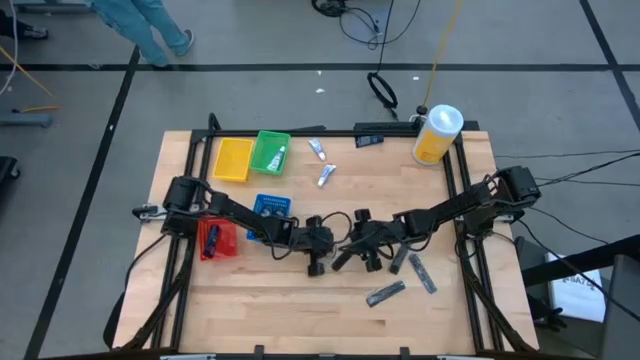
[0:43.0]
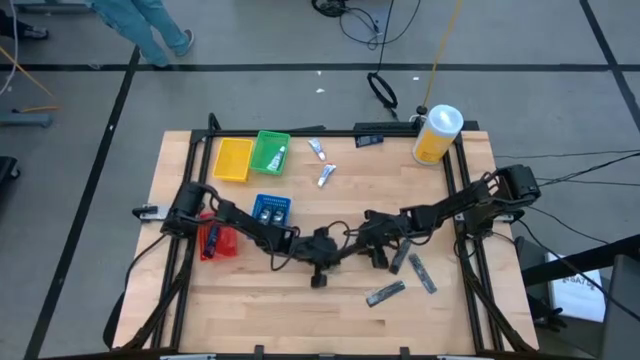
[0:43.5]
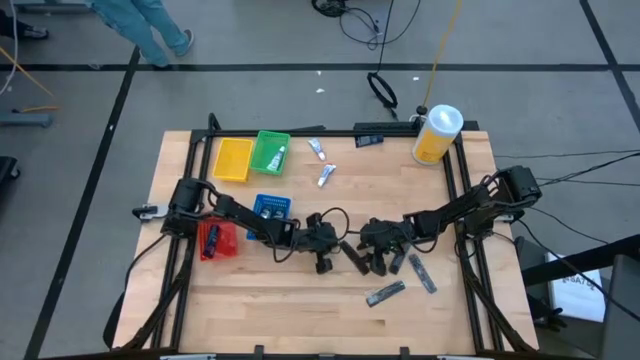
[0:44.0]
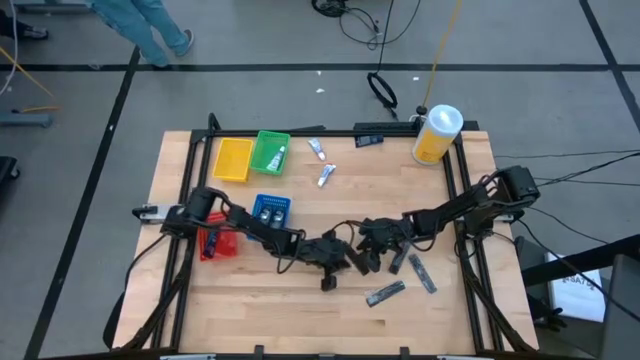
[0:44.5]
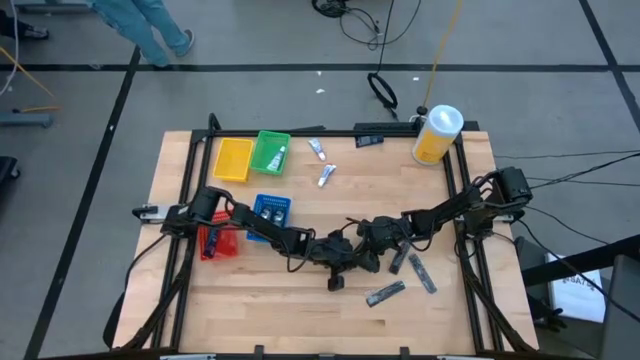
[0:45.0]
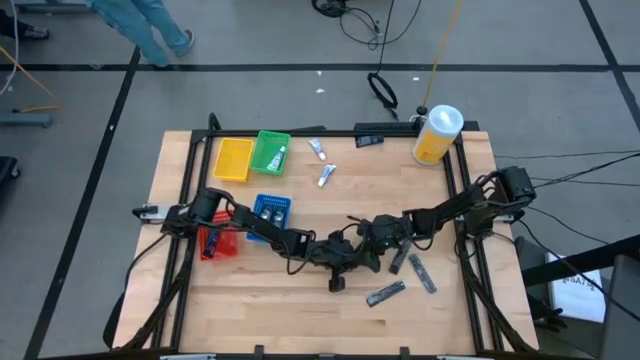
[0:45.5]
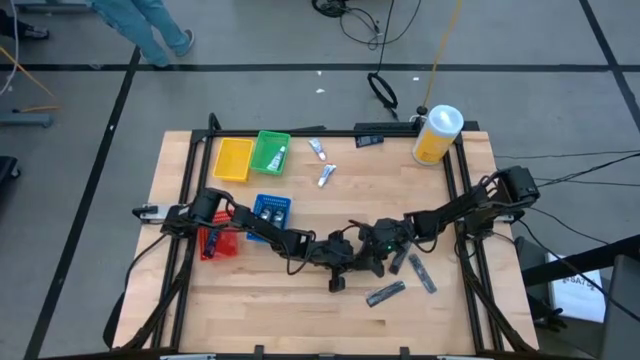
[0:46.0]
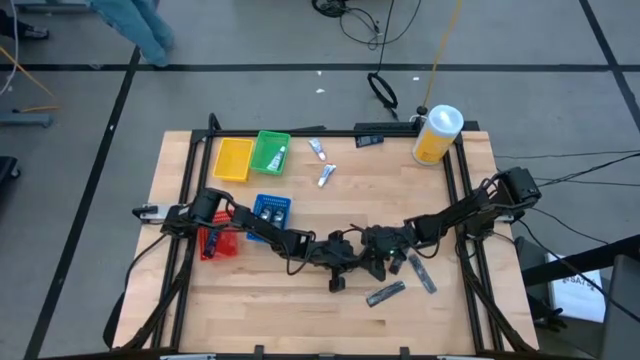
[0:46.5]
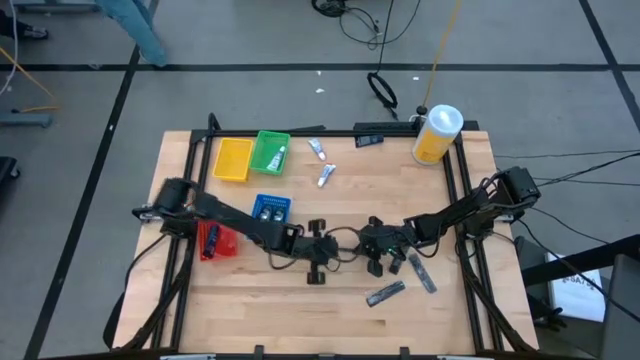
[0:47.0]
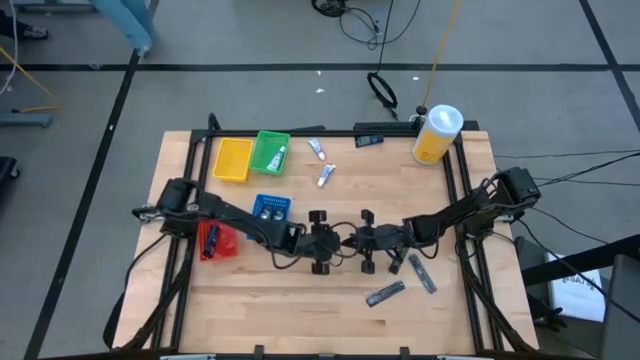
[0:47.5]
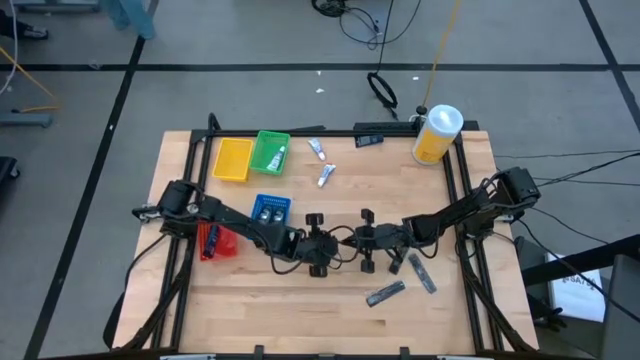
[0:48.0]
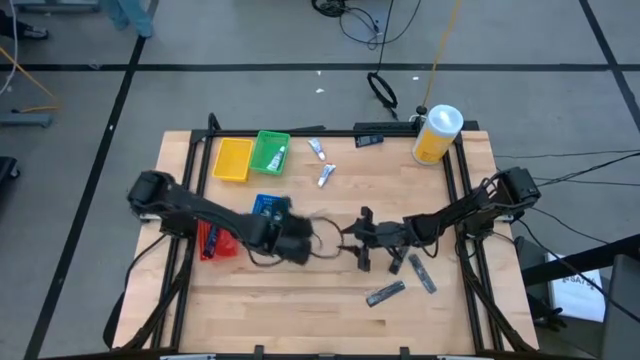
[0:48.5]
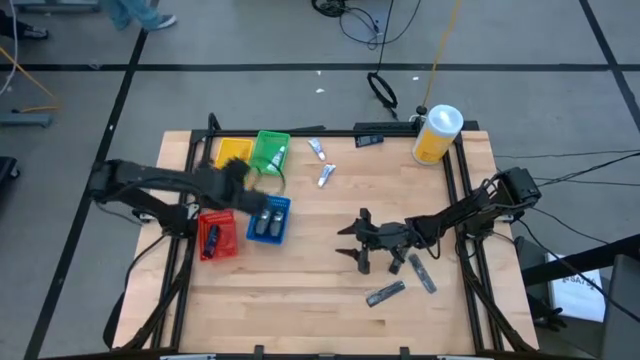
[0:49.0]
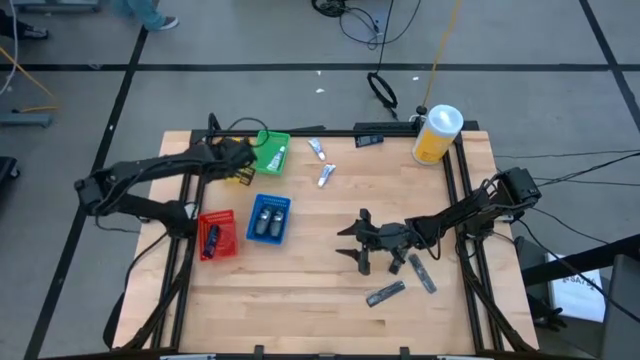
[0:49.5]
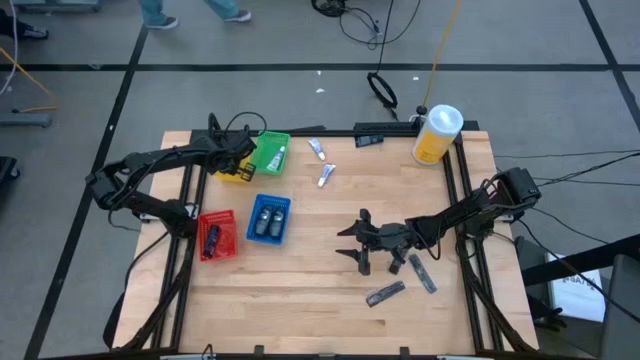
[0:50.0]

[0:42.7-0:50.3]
Task: Pick & Place Travel size toiletries
Put the black comb into the yellow bin

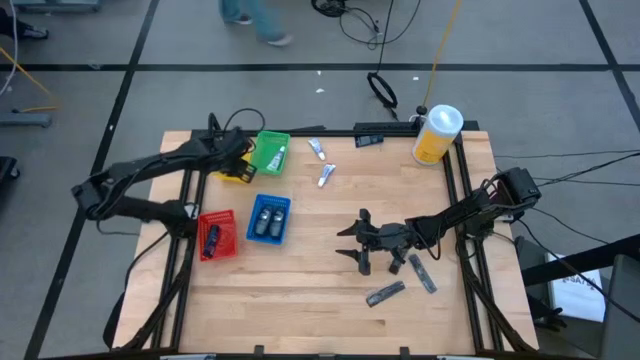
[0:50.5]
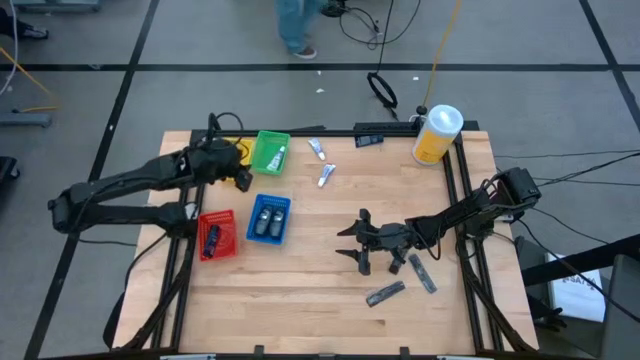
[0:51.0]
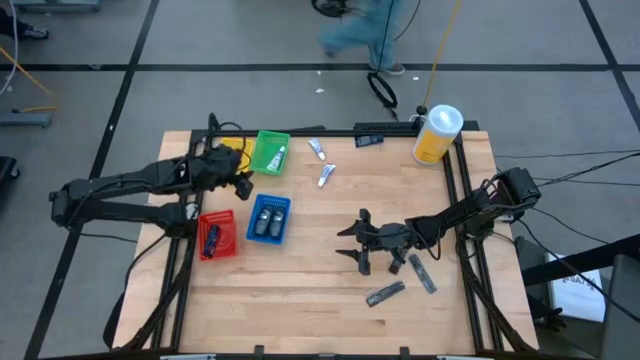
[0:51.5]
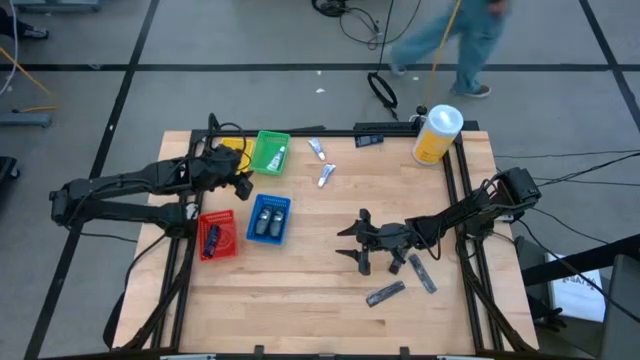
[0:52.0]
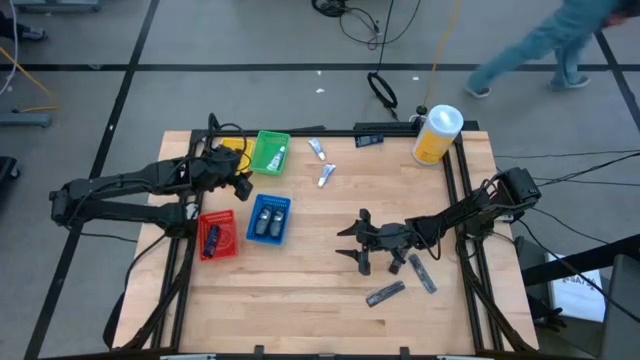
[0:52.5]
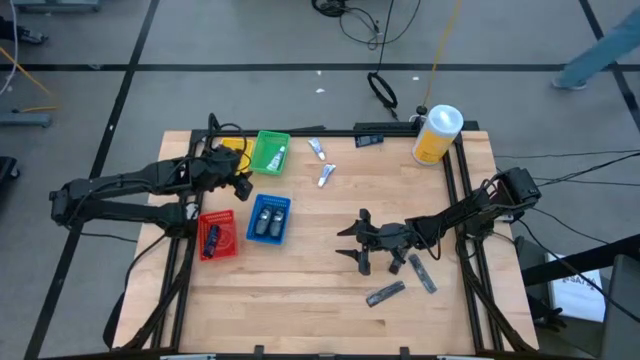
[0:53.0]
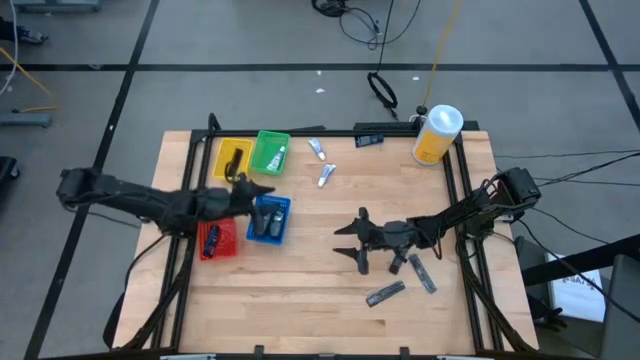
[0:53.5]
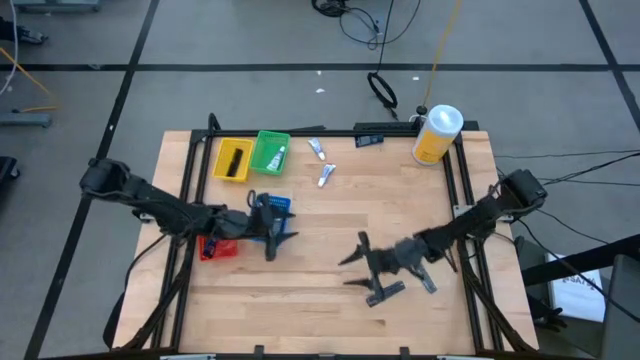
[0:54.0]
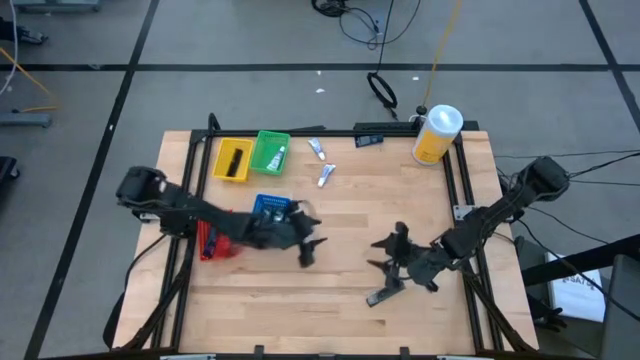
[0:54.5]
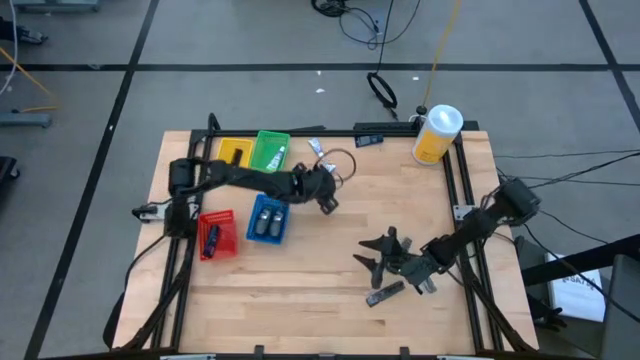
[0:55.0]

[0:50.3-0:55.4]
Put the white toothpaste into the green bin

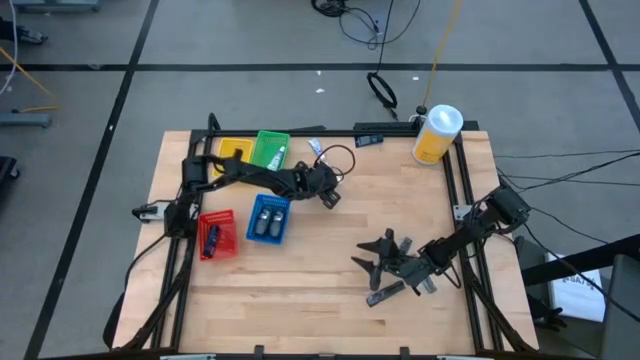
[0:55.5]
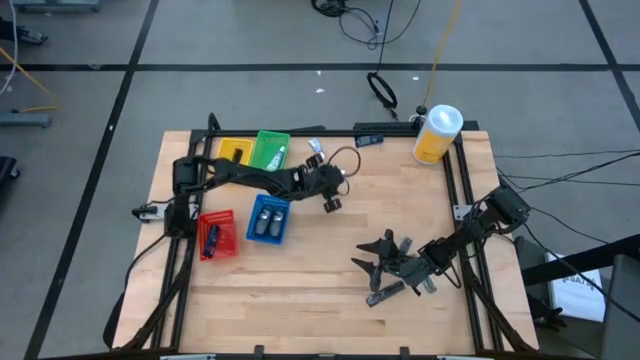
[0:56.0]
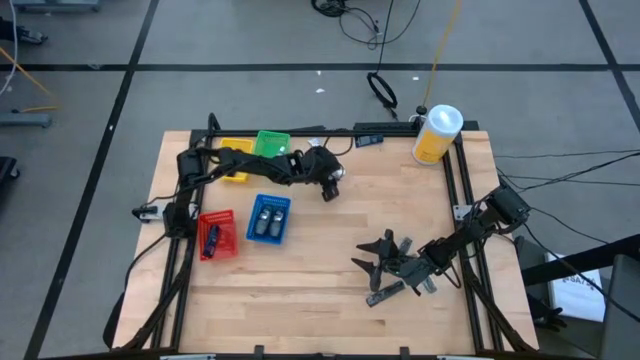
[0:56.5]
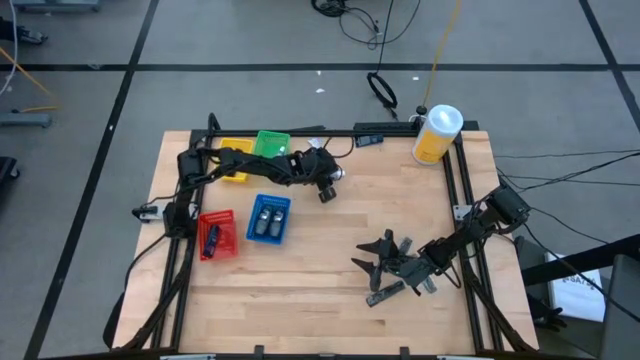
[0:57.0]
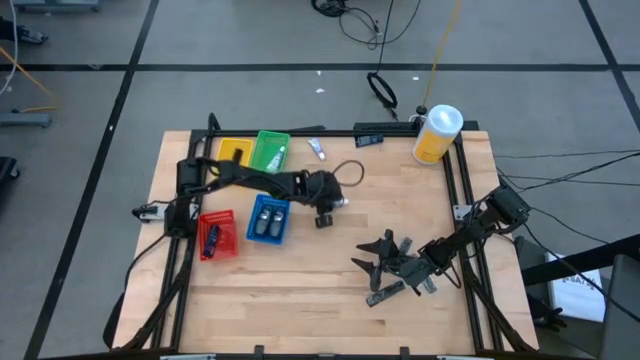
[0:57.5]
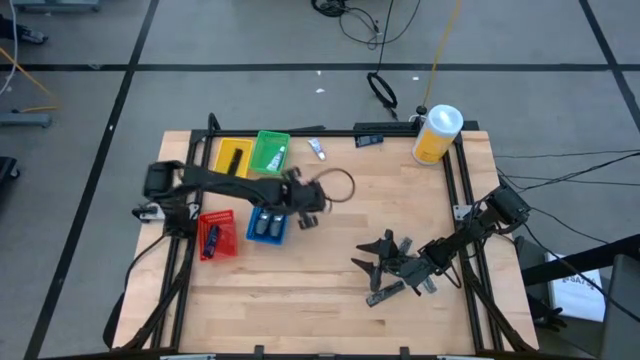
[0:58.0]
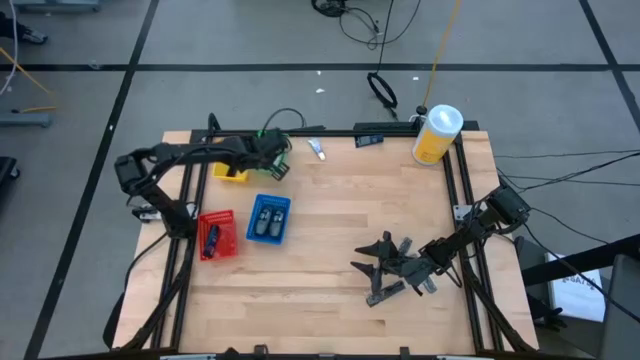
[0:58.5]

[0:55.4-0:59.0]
Put the white toothpaste into the green bin

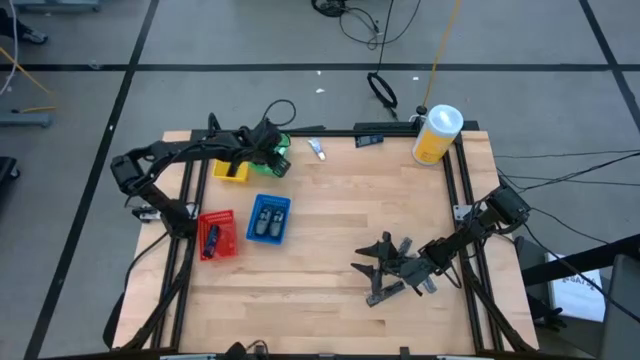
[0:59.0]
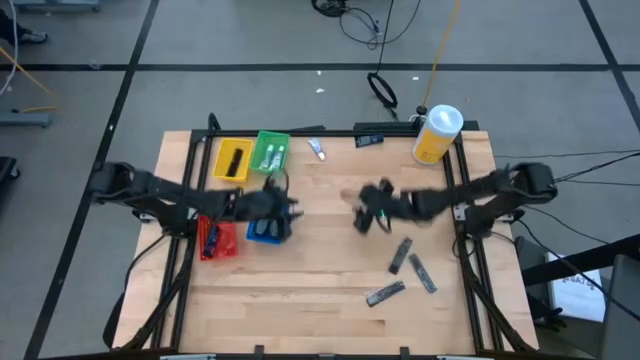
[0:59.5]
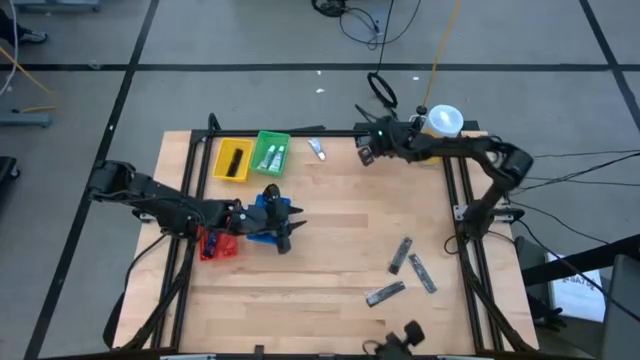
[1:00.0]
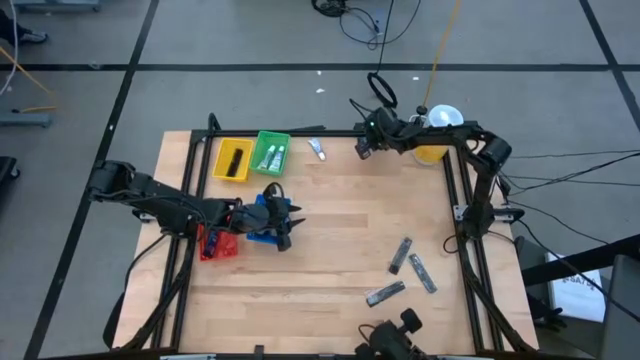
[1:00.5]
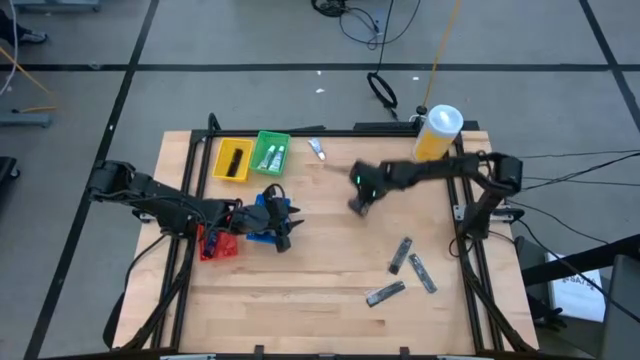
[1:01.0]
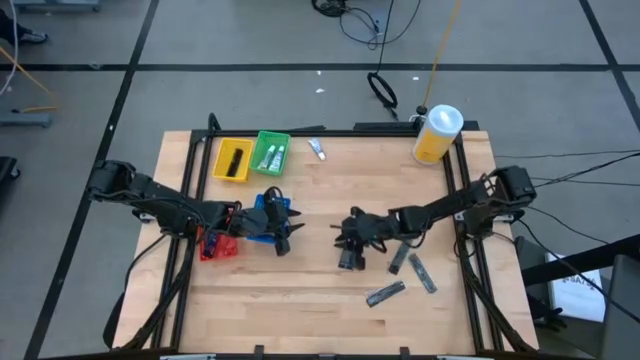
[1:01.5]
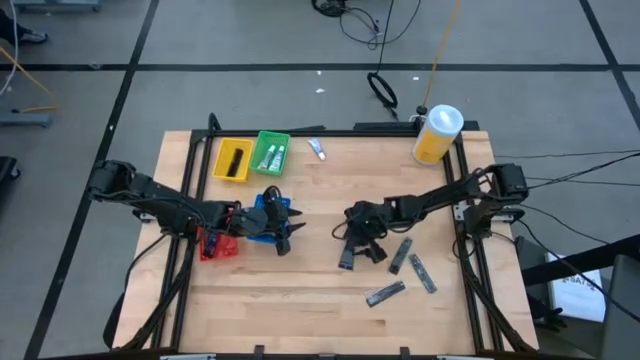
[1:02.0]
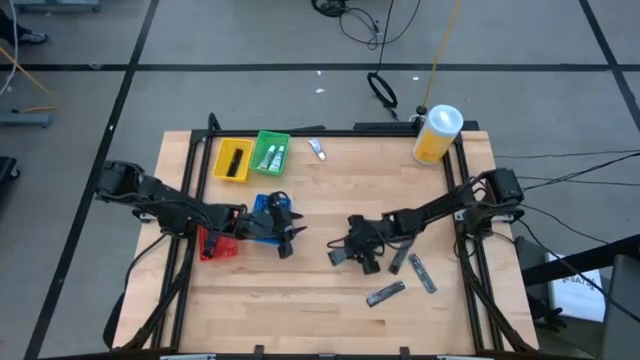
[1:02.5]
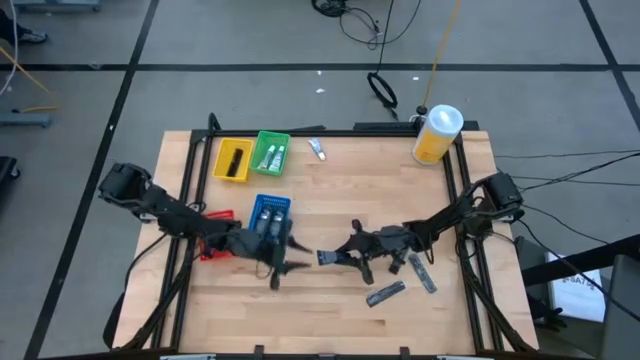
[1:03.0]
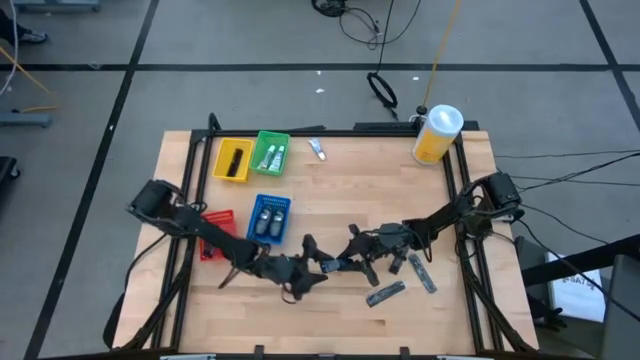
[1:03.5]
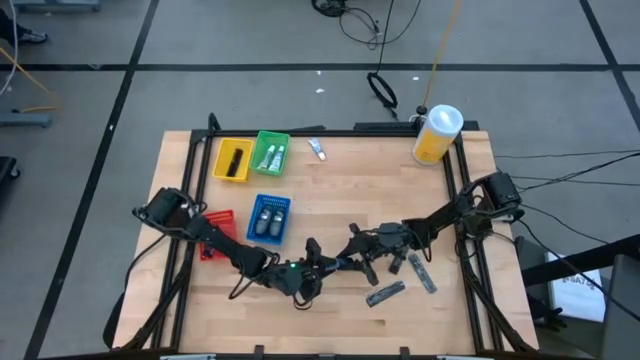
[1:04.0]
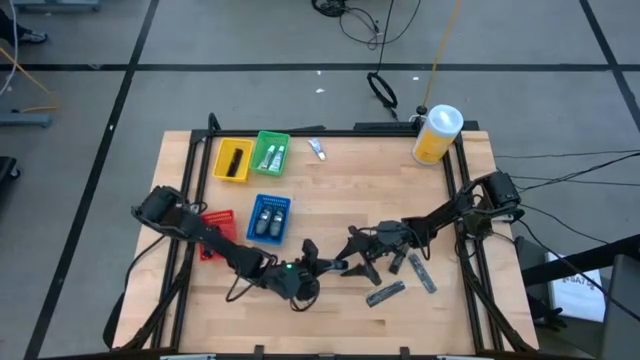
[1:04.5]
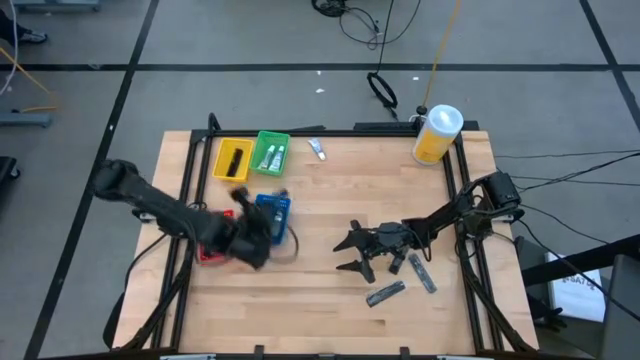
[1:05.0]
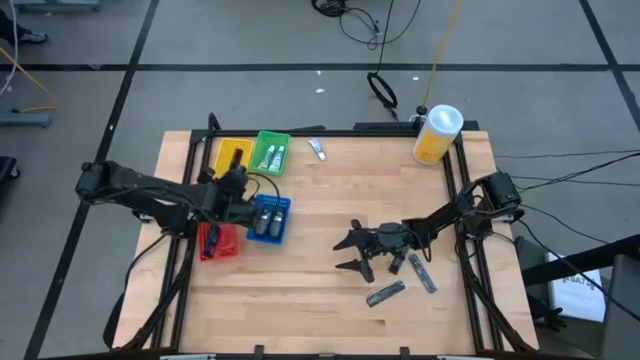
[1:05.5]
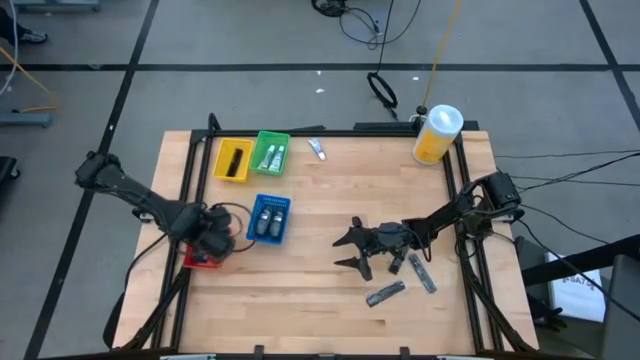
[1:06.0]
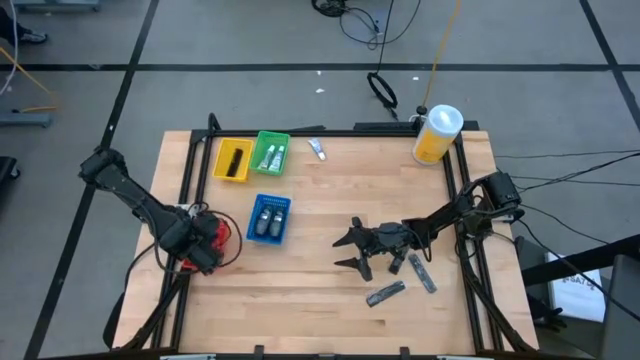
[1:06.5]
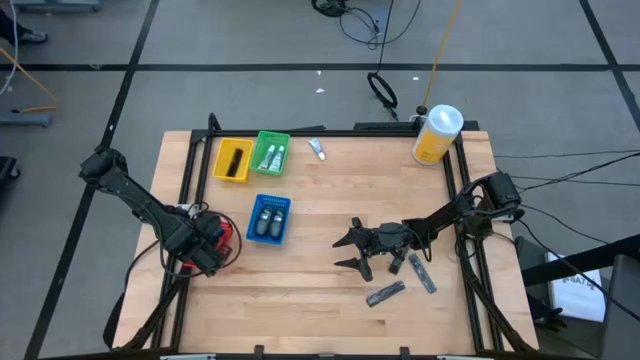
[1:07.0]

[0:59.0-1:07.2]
Put the blue shaving cream into the red bin
